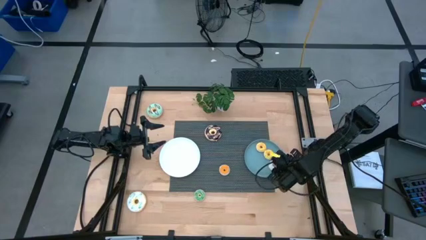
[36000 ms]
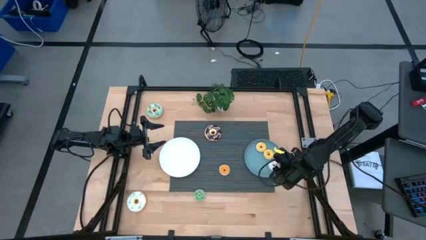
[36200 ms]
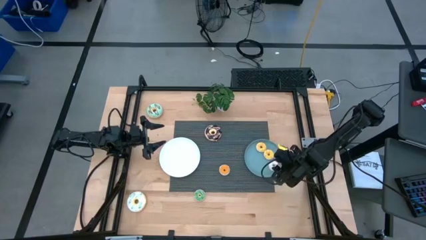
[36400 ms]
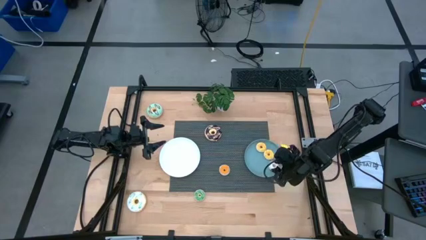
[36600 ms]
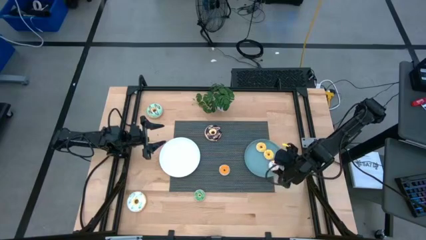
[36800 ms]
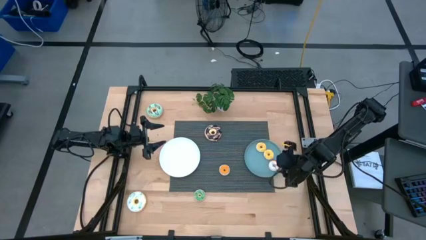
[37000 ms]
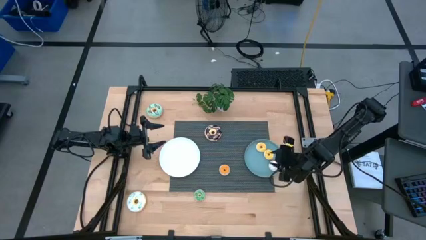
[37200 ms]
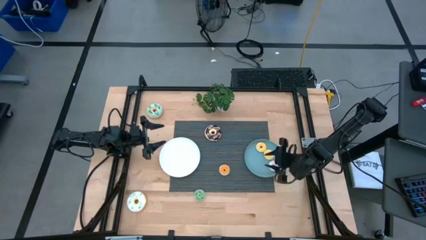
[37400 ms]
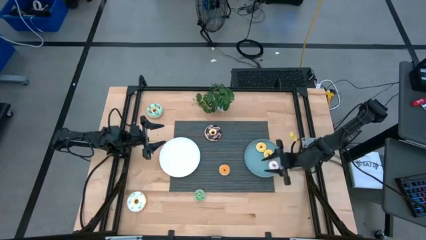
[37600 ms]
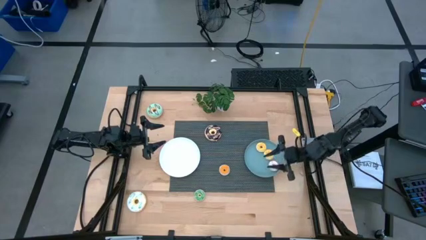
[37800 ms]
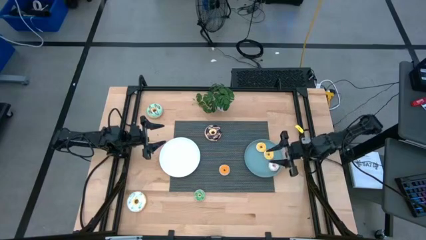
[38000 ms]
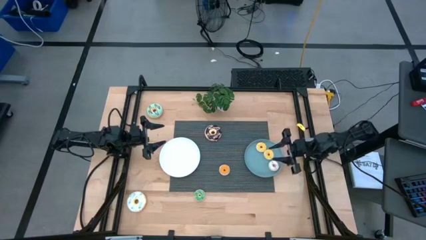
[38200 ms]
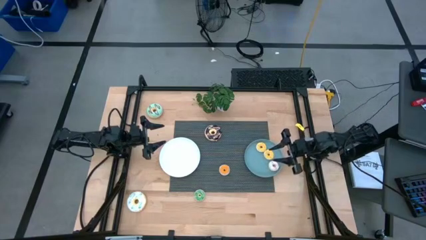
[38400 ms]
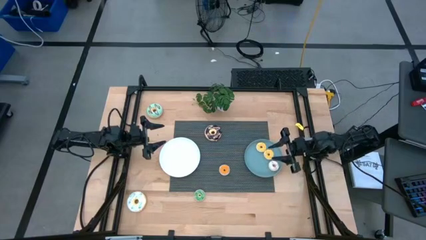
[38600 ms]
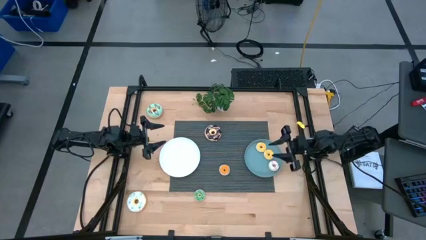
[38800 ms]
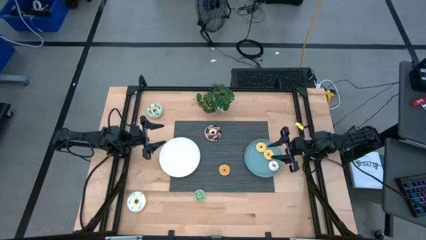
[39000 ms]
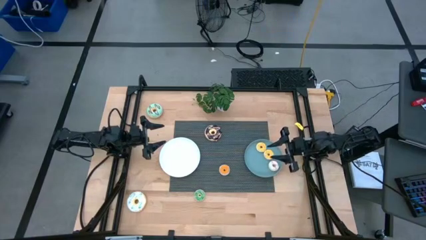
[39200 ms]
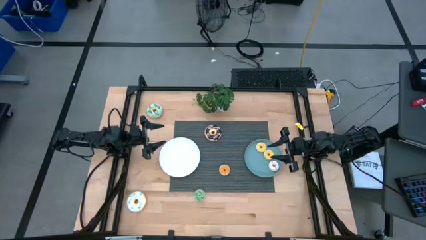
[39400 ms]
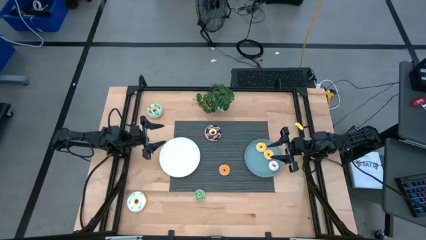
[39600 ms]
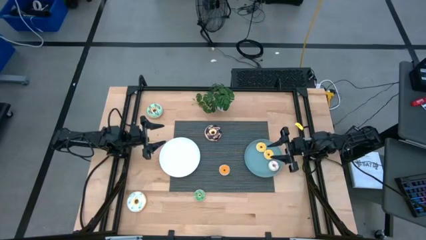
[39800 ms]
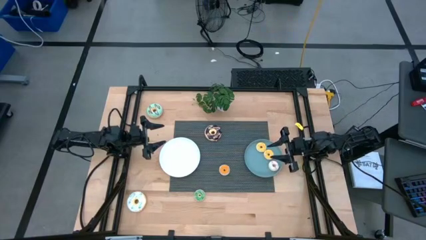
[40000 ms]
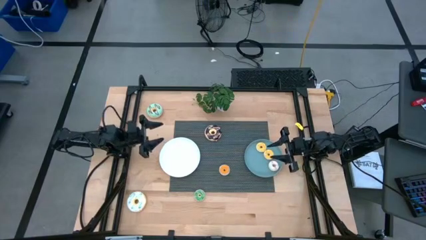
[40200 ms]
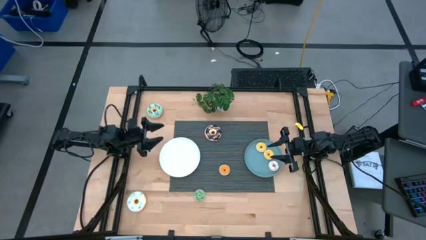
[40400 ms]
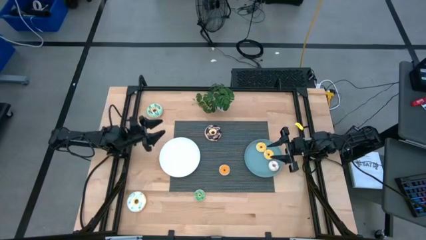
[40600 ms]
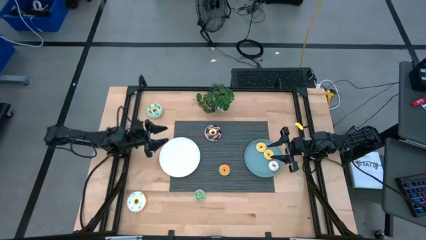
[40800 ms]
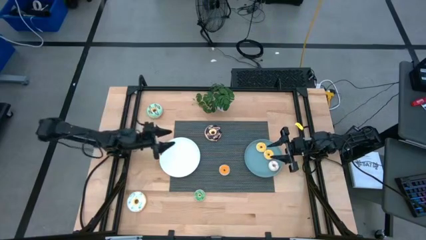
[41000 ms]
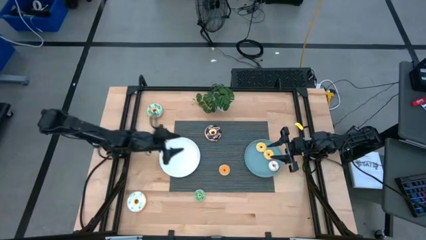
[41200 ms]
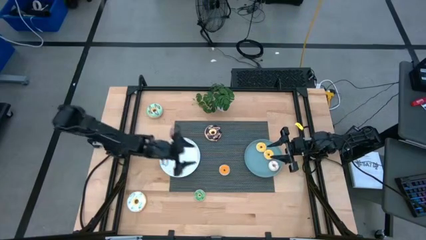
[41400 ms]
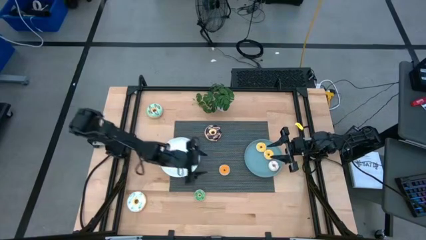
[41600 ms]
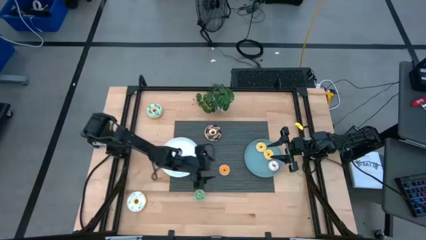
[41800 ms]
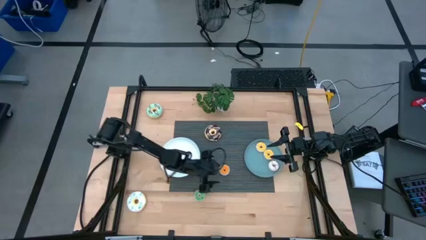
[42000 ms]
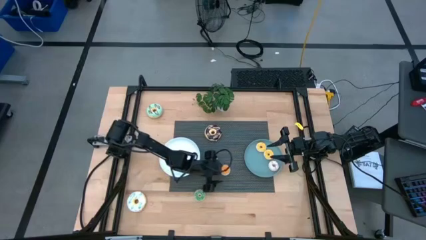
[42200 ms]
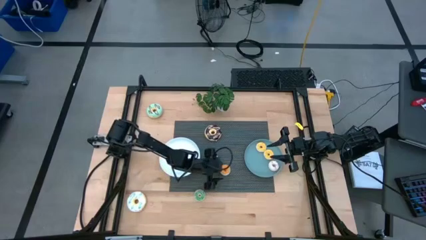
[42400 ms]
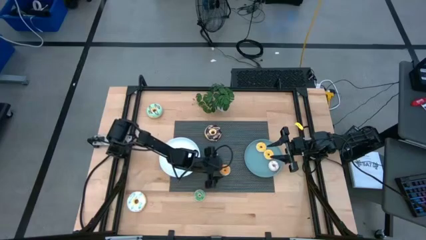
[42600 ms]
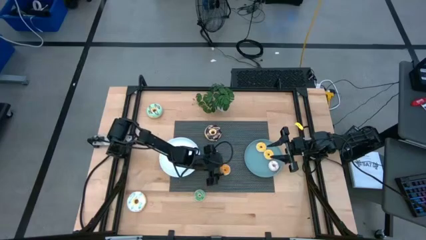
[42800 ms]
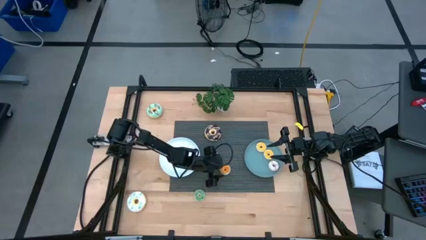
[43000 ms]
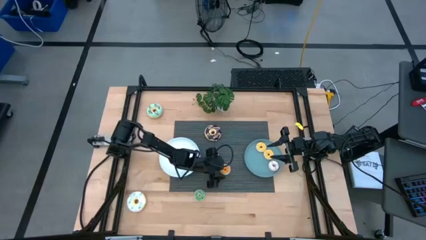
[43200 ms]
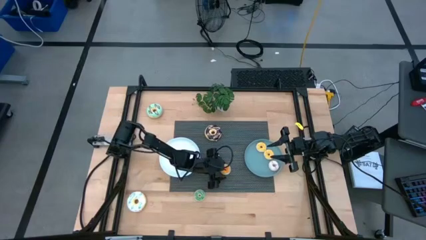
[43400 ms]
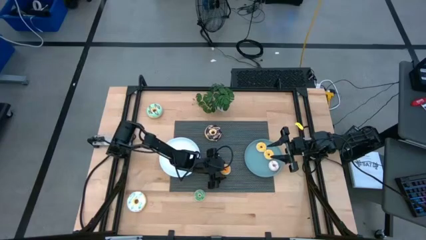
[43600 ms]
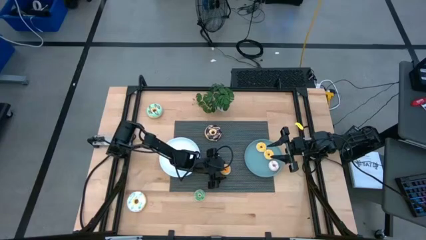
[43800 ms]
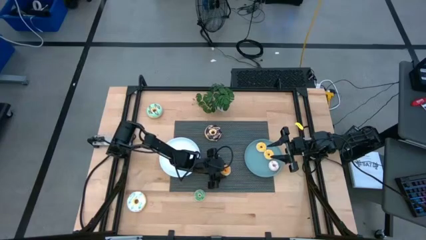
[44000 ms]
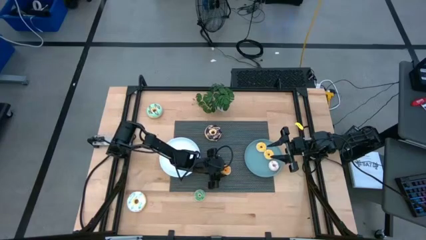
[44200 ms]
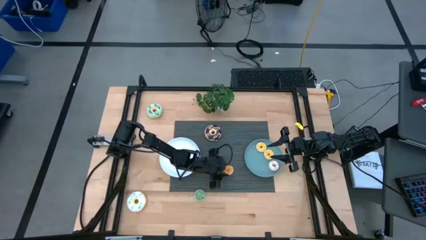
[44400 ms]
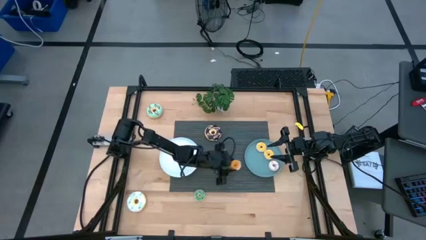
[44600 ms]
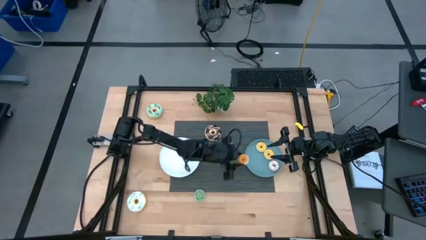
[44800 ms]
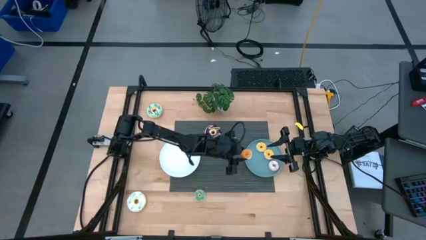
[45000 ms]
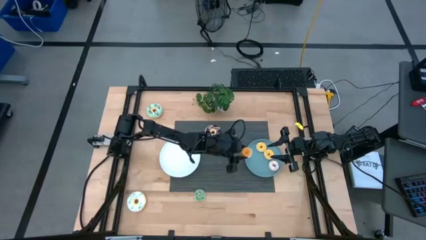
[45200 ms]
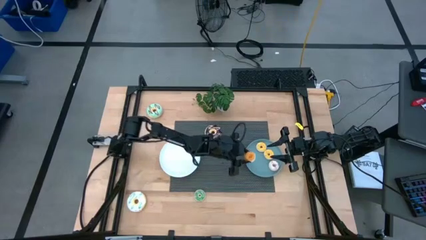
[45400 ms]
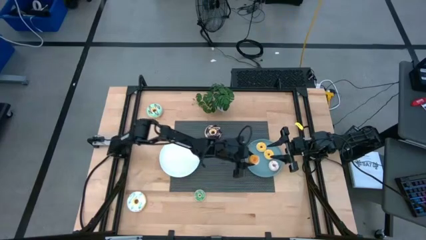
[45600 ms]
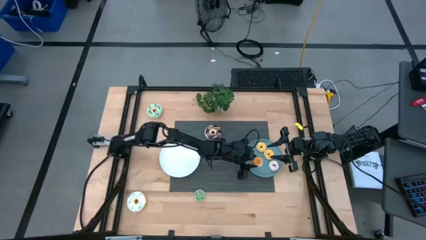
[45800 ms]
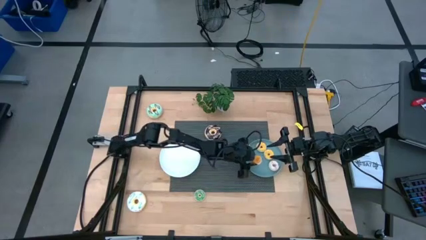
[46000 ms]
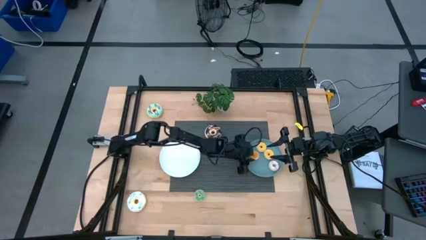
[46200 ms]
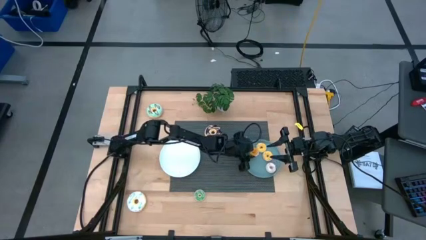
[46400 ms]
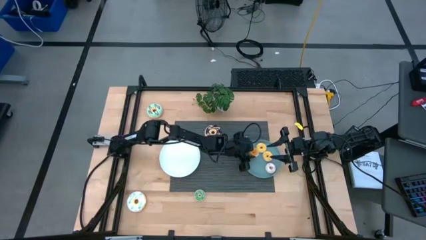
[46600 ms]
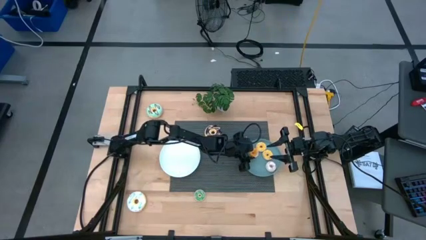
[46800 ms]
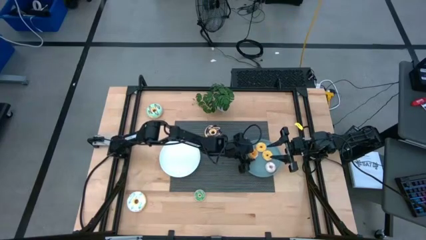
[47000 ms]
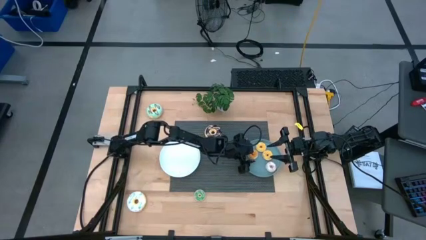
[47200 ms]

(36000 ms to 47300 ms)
Task: Pick & Place donuts
Put the small orange doughnut on top of the blue plate

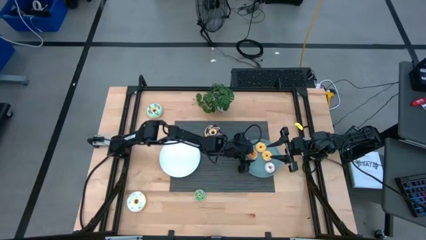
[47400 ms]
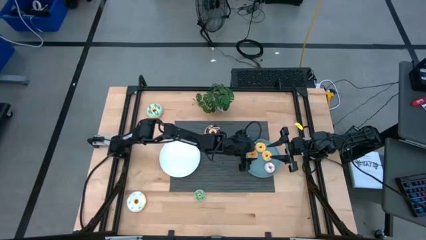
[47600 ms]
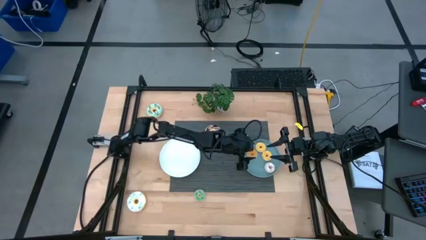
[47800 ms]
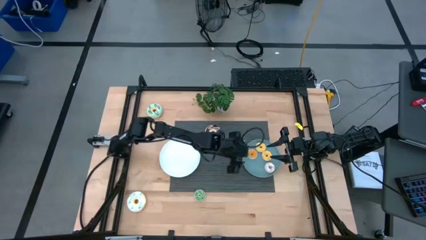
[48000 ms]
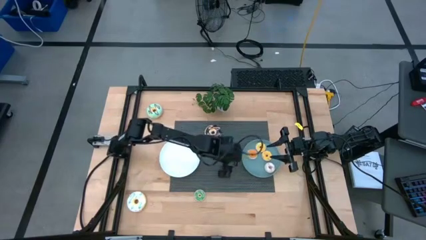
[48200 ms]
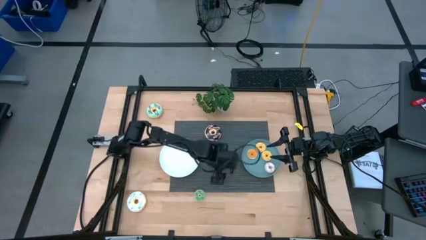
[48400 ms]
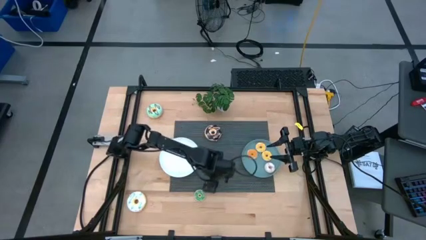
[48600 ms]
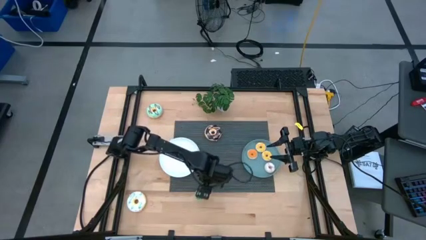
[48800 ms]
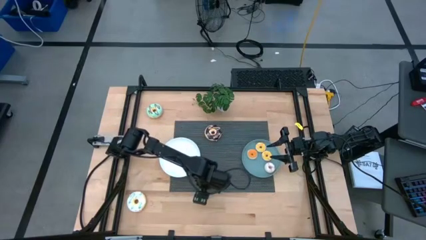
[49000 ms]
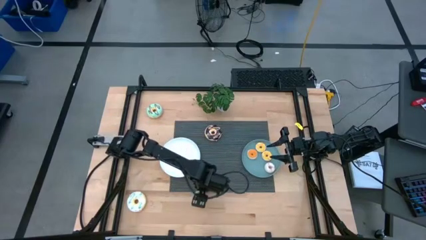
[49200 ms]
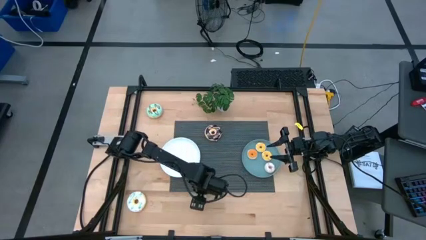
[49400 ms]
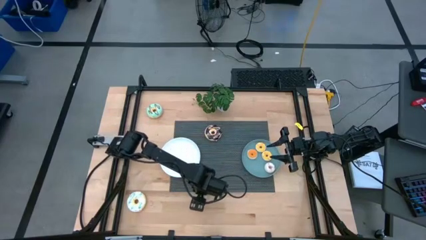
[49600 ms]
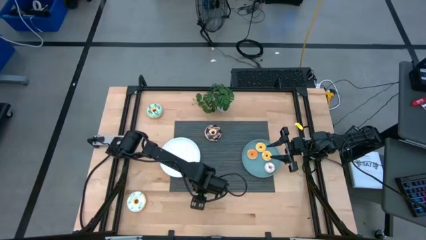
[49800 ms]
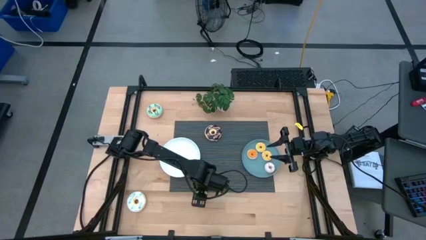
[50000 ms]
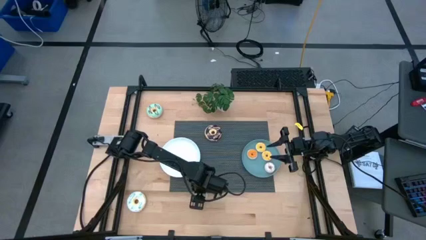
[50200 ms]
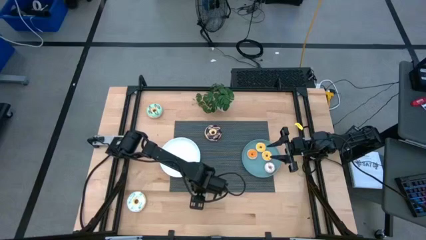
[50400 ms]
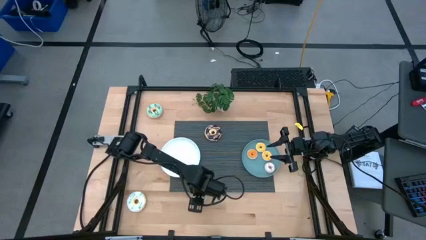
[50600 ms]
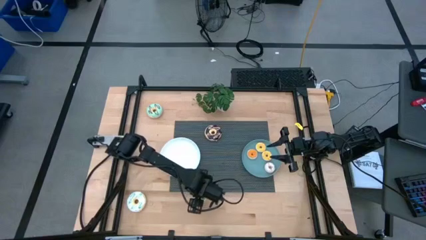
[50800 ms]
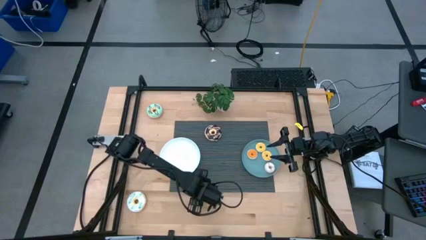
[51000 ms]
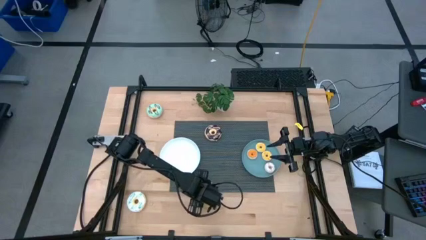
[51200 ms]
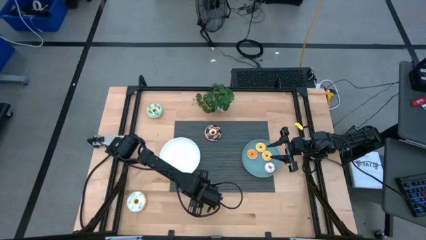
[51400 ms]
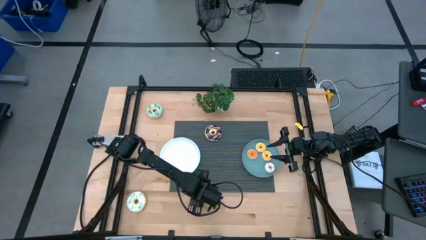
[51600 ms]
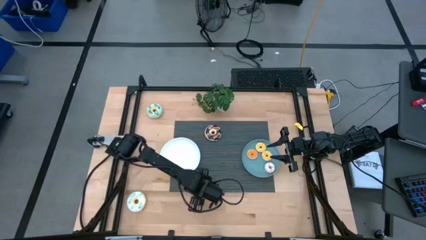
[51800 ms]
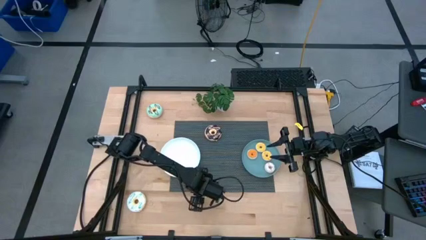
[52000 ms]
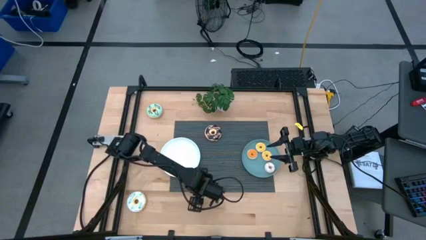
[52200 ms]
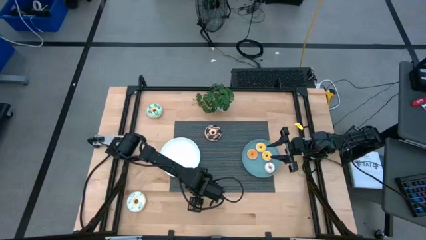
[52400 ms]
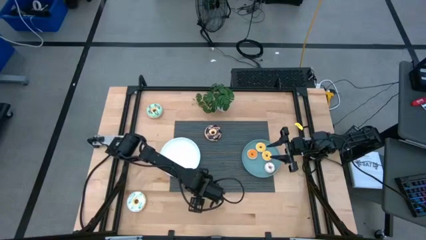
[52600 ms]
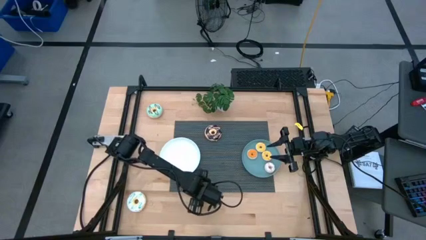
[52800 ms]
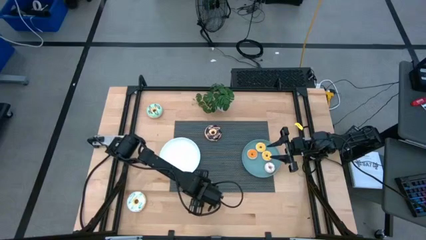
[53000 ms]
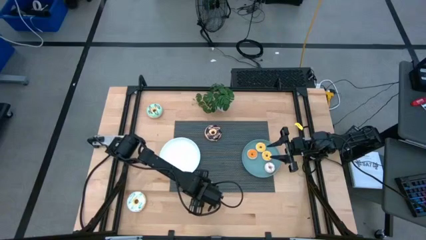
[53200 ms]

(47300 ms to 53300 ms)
Put the small green doughnut on top of the blue plate
